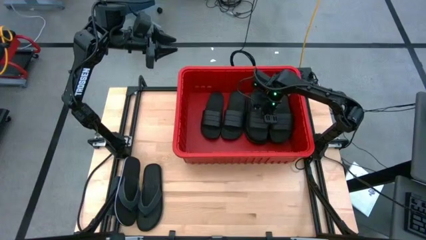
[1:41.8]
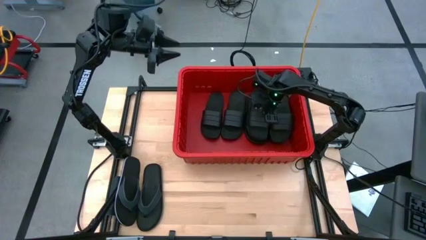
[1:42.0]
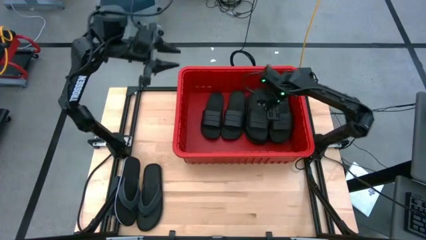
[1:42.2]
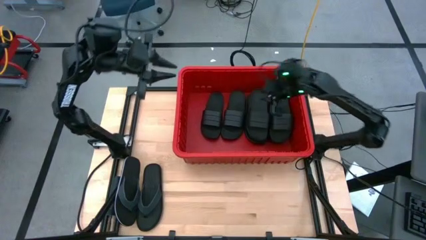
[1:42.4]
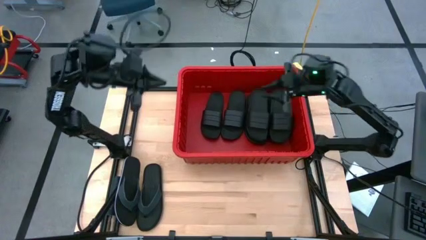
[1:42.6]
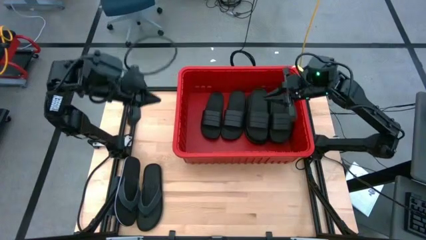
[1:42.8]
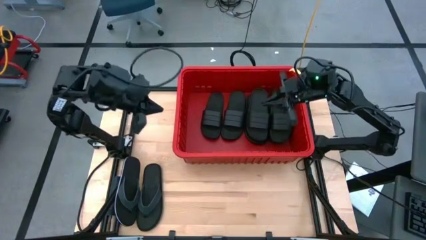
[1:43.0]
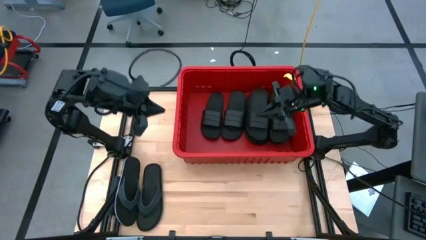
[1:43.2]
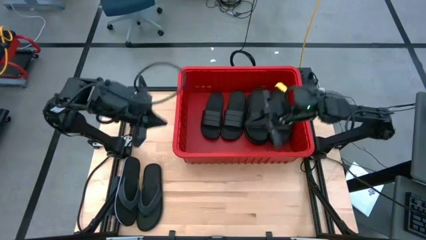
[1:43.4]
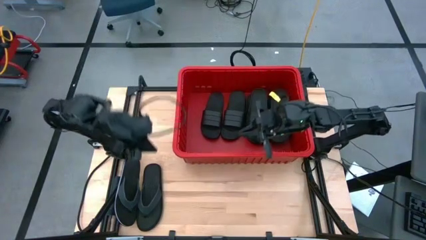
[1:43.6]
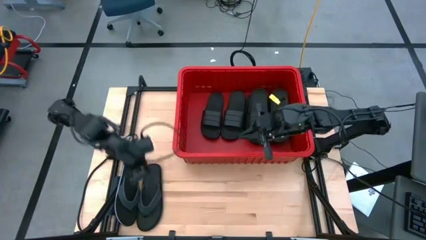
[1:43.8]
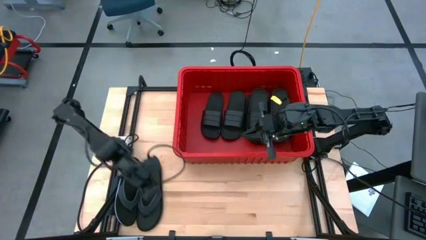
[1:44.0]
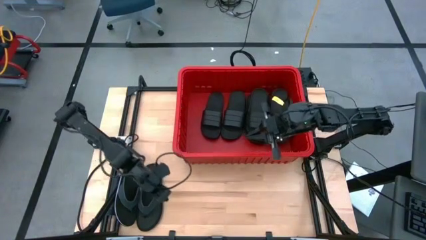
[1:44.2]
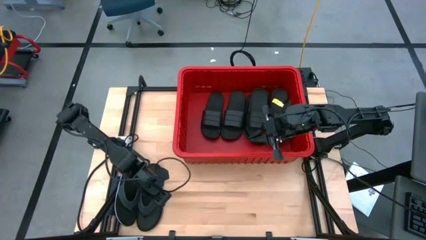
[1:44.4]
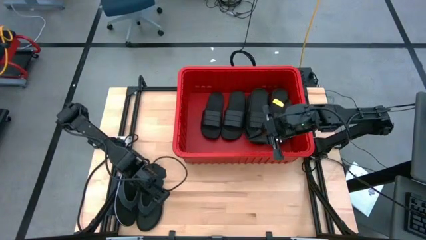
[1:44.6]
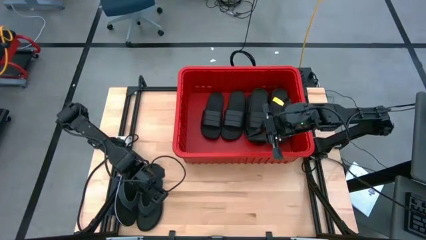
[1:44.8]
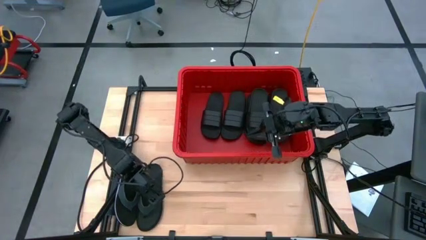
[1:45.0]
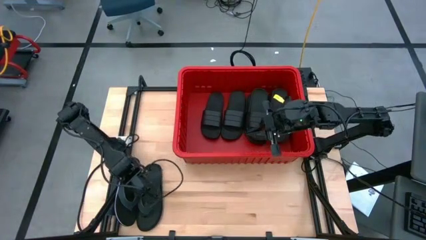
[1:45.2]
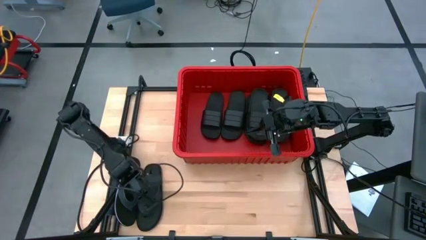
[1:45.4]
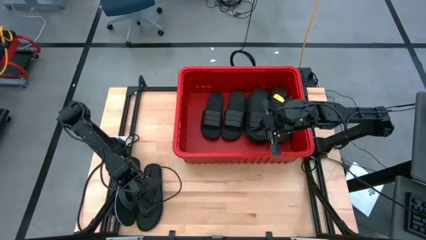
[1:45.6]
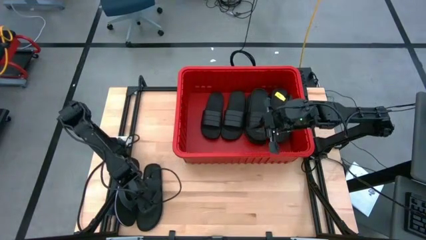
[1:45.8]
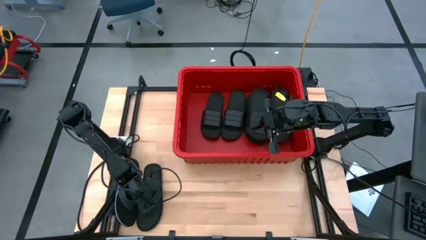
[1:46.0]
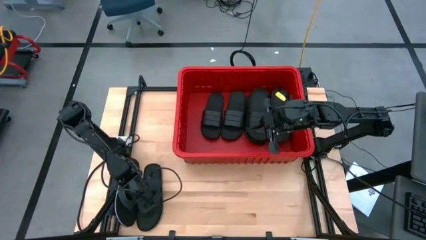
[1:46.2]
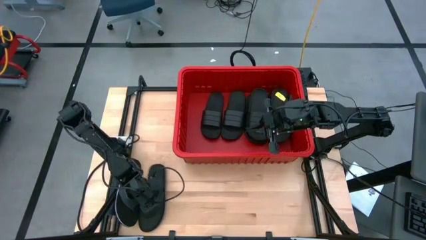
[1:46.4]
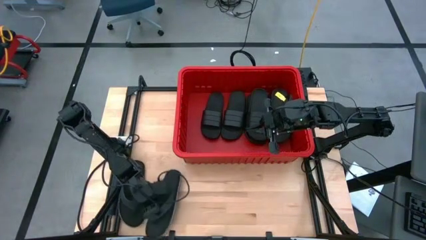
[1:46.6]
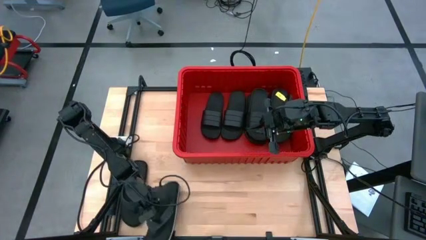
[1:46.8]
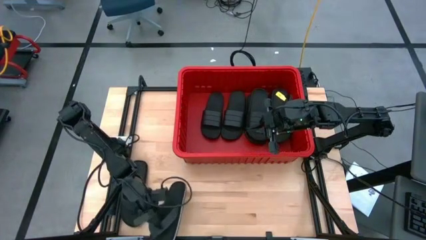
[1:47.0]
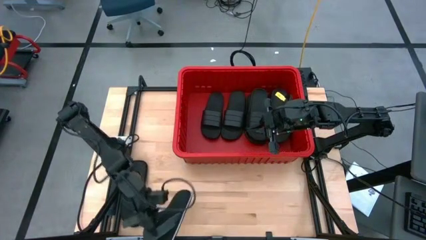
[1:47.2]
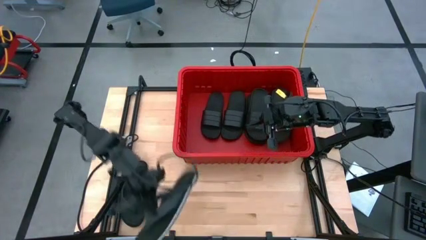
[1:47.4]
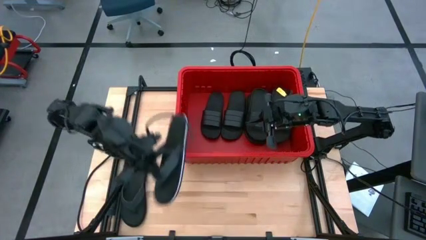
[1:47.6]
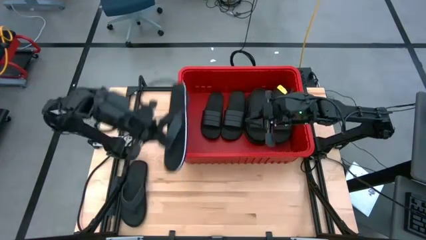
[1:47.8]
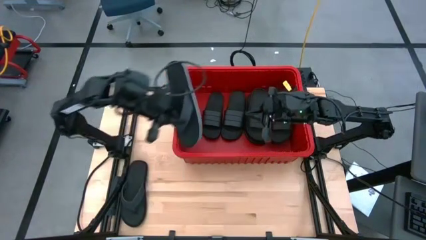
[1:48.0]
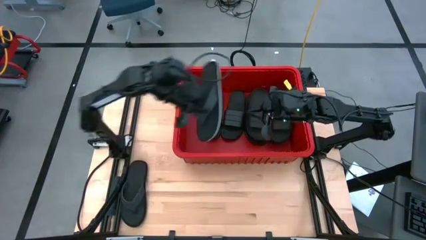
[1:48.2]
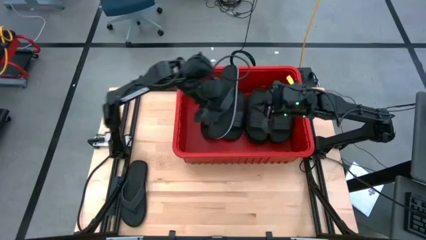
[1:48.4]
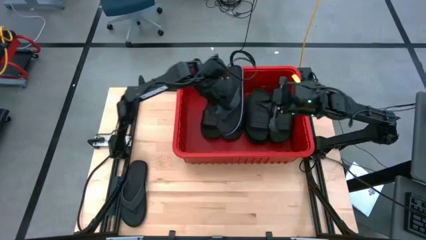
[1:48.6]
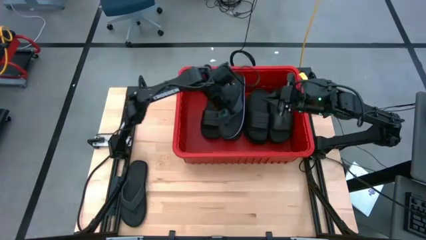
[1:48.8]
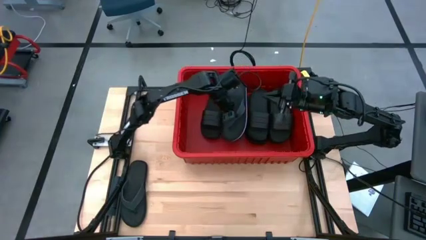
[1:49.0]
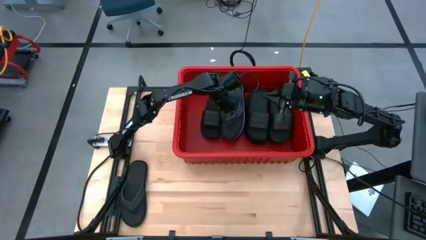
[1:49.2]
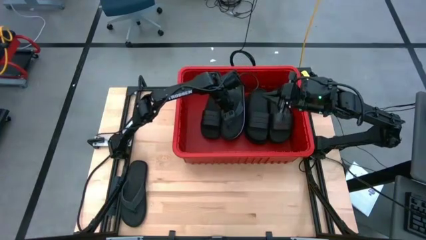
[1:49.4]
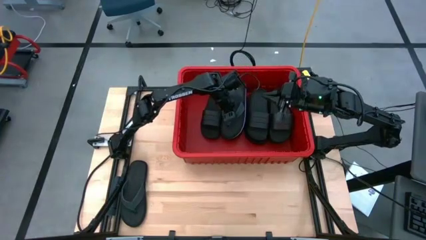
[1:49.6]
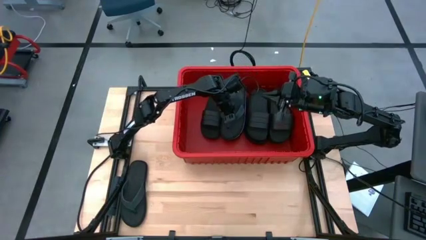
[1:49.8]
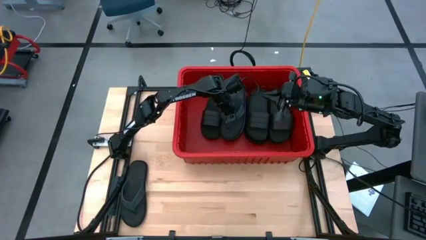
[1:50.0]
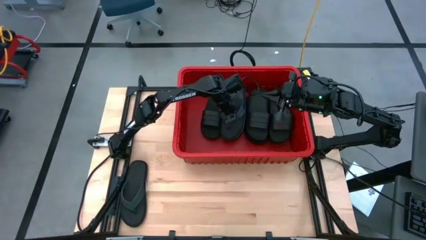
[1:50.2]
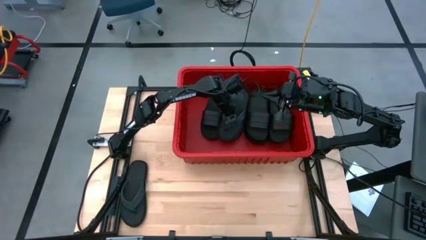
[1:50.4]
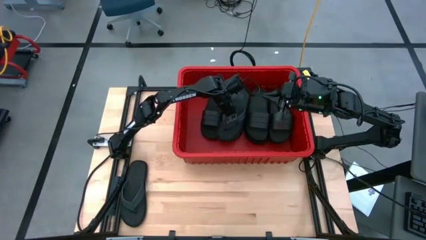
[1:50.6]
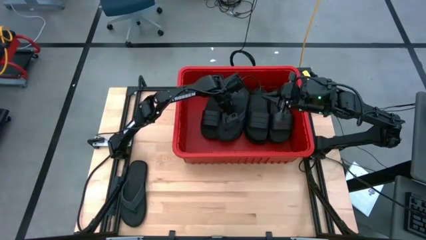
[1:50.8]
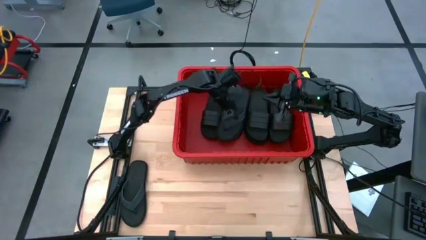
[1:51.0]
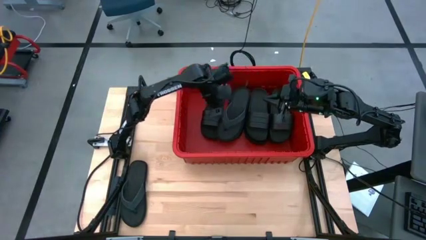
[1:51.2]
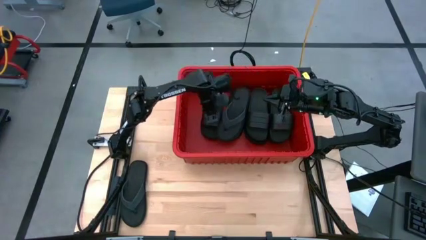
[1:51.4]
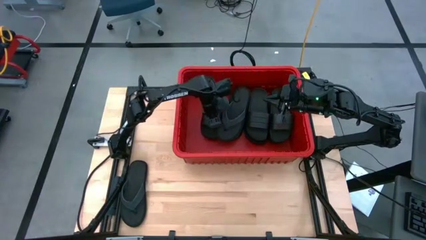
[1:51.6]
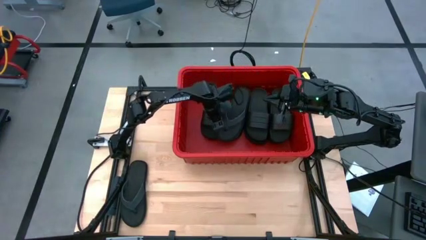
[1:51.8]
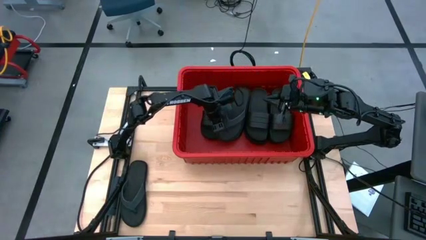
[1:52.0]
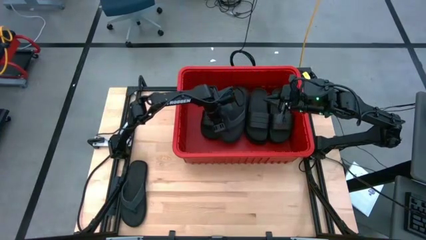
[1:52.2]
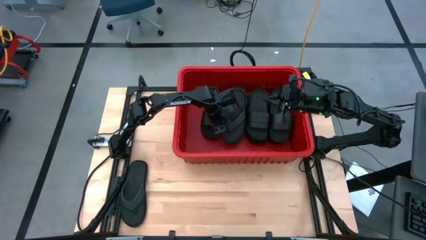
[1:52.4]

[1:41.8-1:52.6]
Task: Pick and place slides into bin
Put the right black flip flop on top of the other black slide into the red bin

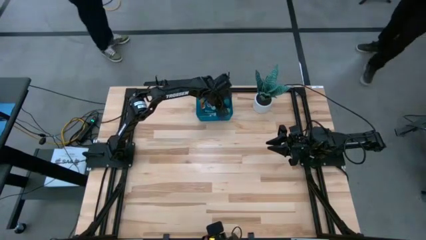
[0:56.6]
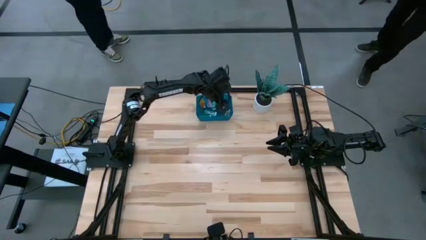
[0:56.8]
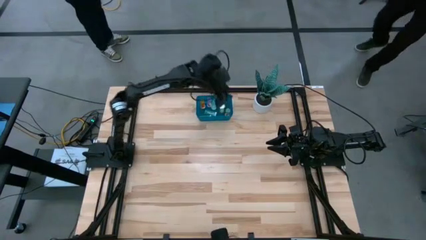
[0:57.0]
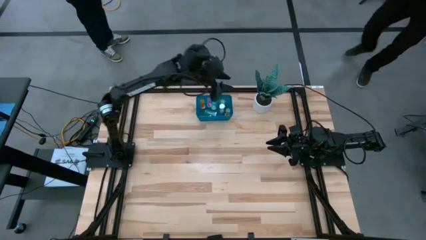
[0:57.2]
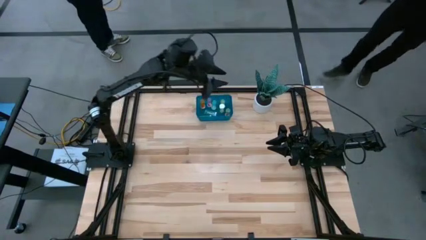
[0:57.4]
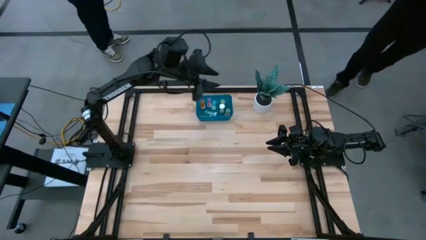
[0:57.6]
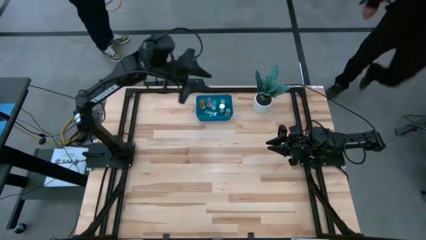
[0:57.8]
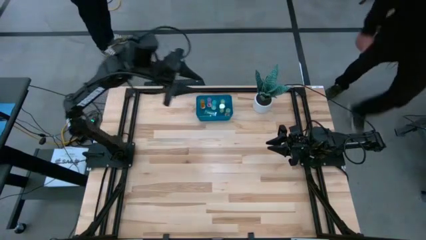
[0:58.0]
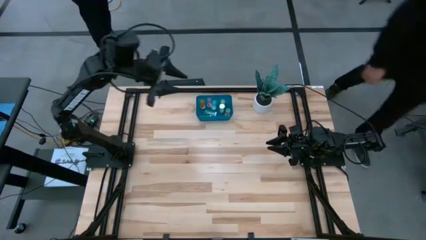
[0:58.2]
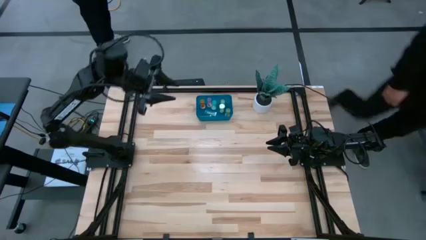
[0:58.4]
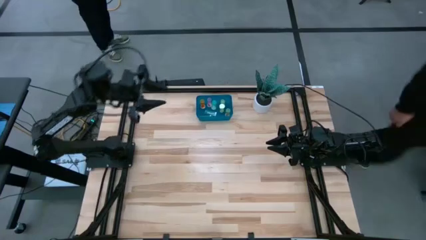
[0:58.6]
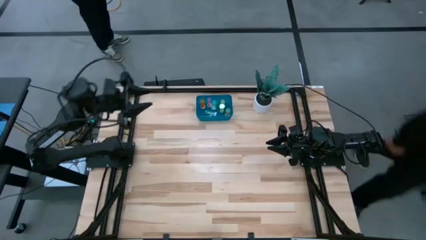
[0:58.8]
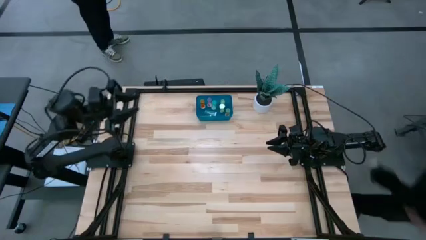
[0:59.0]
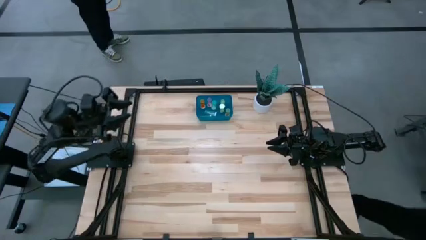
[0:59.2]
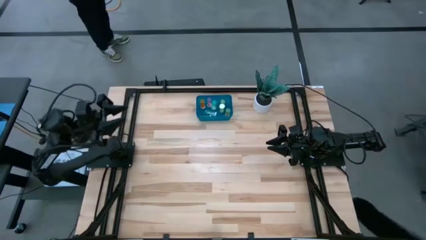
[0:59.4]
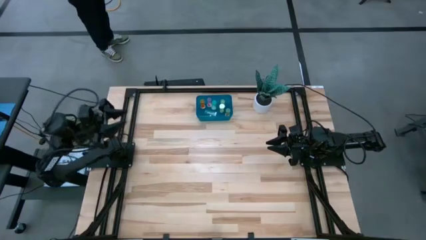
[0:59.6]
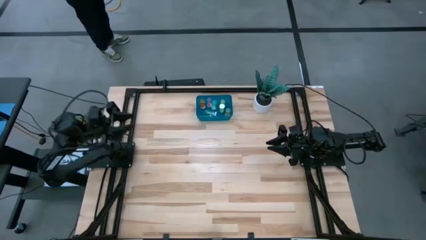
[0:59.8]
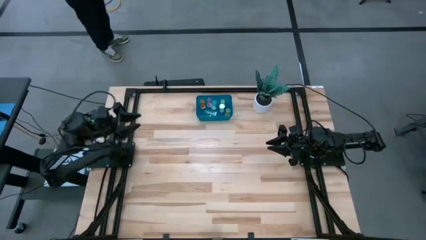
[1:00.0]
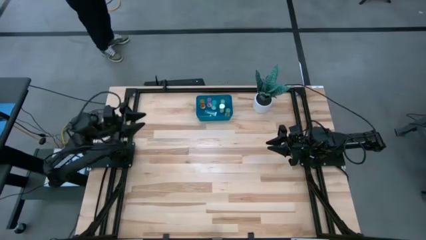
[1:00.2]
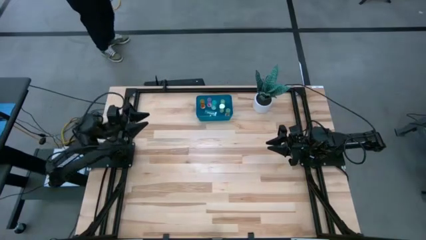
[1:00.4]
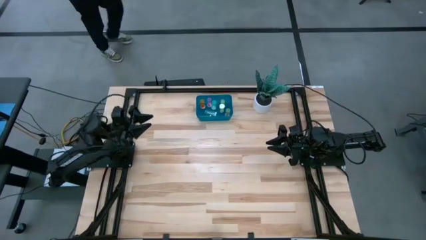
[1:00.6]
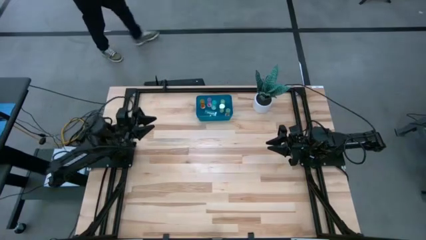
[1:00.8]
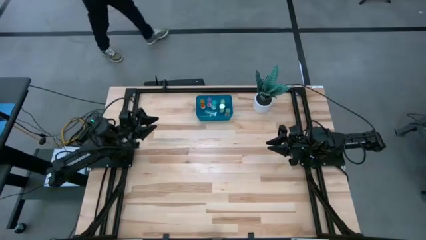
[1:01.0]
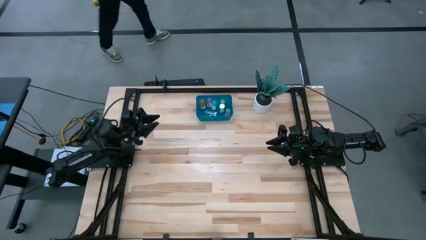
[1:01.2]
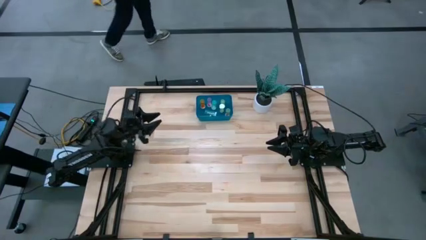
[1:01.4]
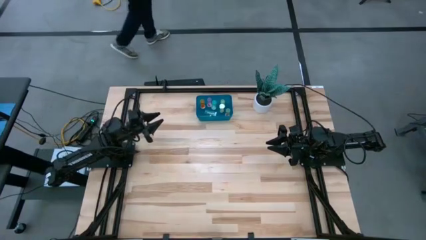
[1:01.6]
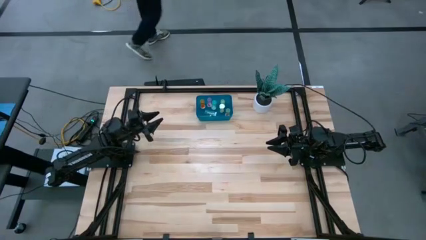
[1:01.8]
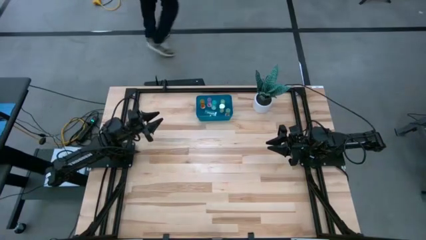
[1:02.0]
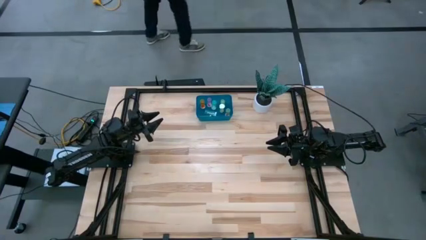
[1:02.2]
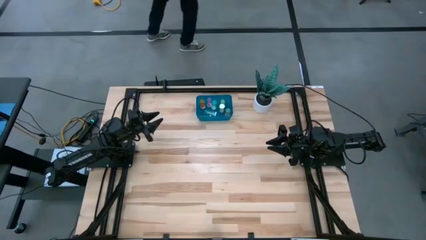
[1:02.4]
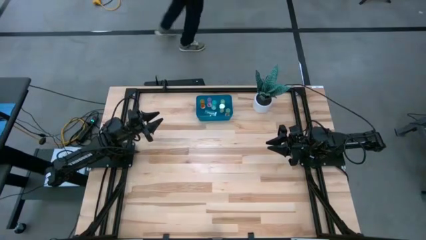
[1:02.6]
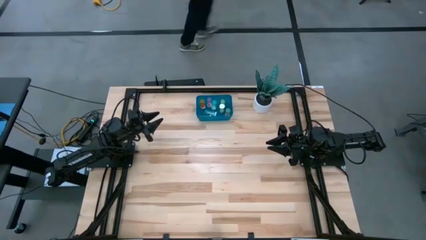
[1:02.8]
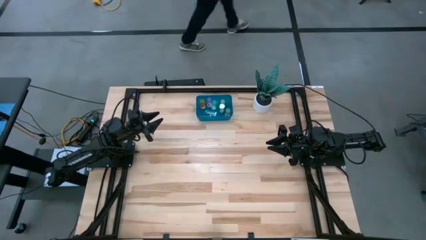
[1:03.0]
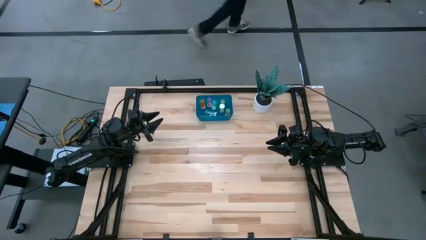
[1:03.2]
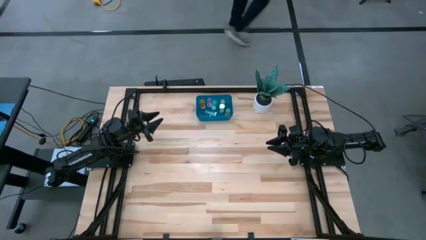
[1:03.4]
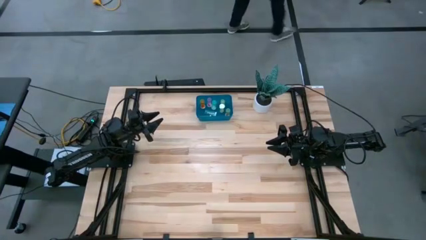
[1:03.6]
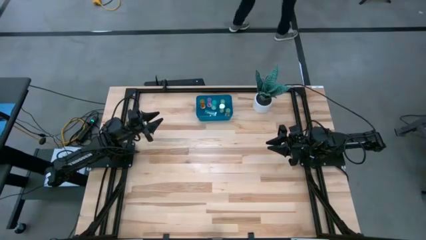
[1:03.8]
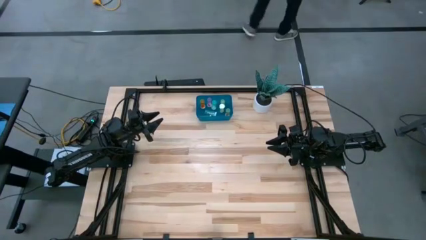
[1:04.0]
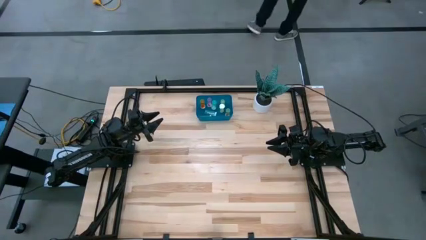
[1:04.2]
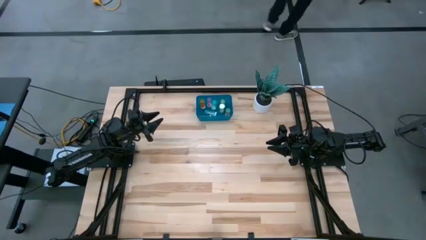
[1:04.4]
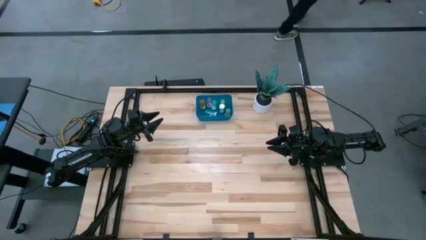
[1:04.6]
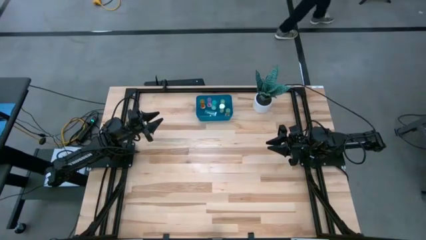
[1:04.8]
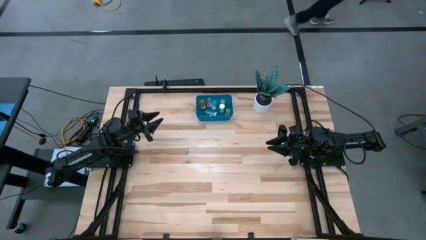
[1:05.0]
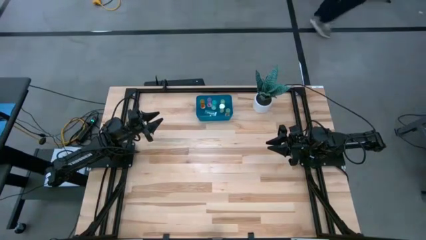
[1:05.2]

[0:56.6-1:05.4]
Task: Pick and place pill bottles into a basket
Return to Home Position
